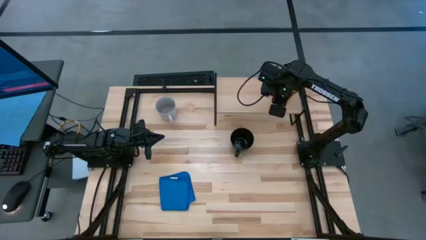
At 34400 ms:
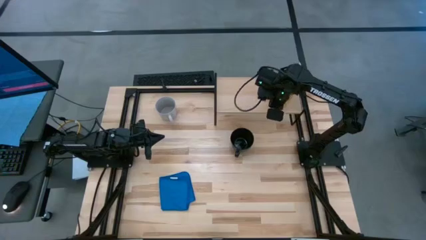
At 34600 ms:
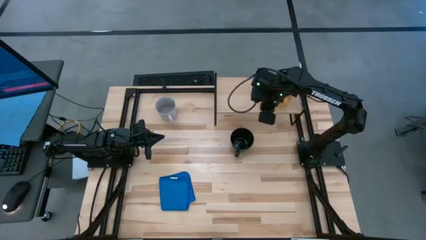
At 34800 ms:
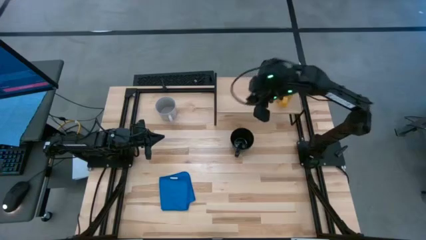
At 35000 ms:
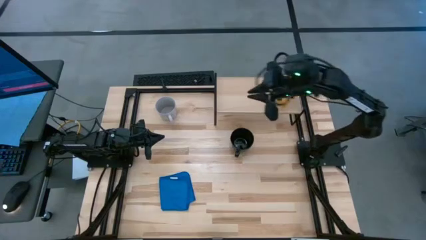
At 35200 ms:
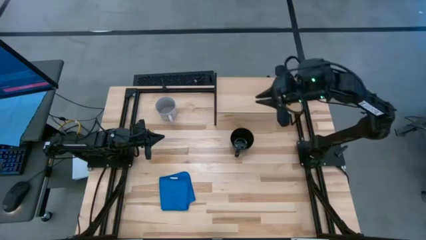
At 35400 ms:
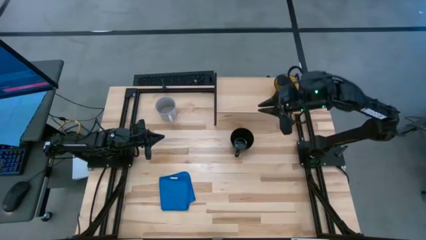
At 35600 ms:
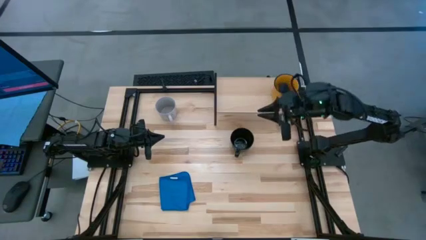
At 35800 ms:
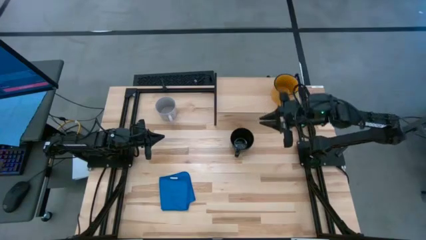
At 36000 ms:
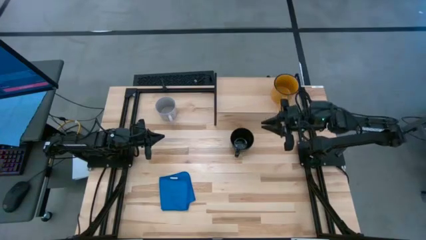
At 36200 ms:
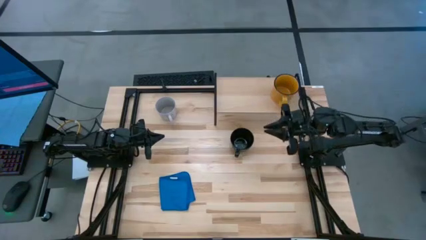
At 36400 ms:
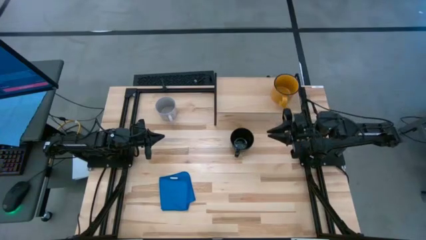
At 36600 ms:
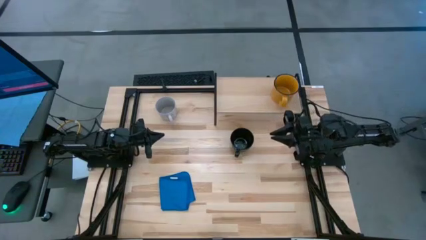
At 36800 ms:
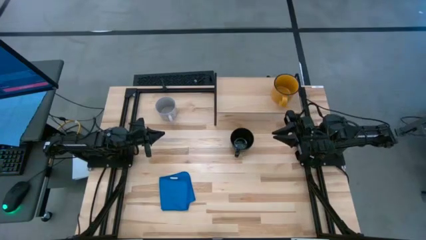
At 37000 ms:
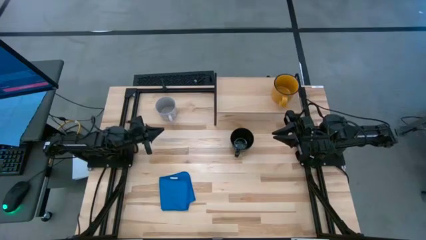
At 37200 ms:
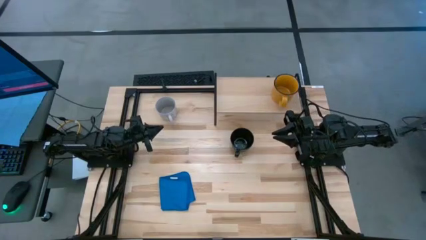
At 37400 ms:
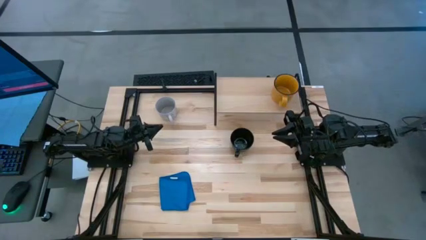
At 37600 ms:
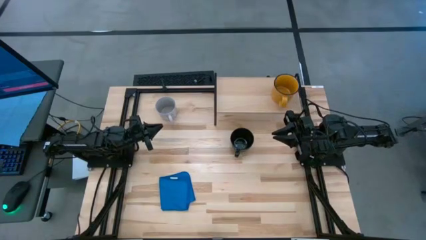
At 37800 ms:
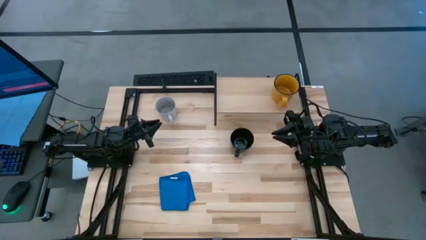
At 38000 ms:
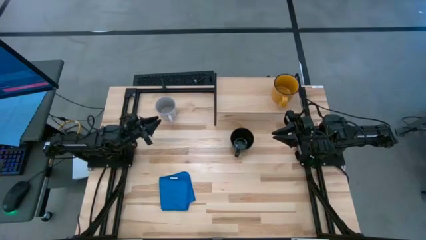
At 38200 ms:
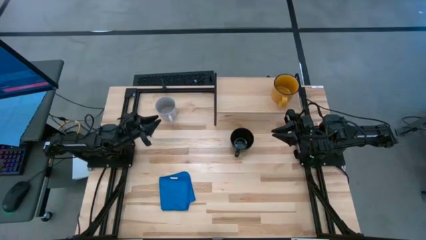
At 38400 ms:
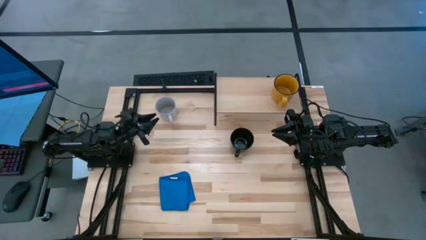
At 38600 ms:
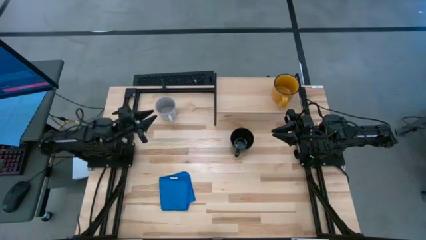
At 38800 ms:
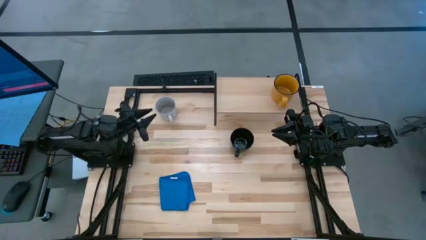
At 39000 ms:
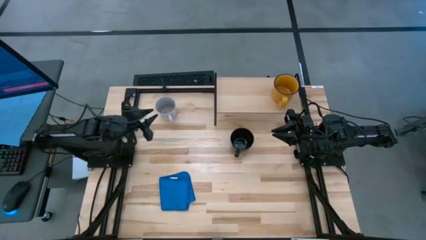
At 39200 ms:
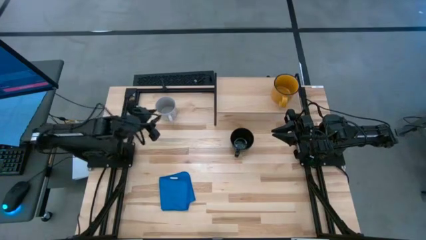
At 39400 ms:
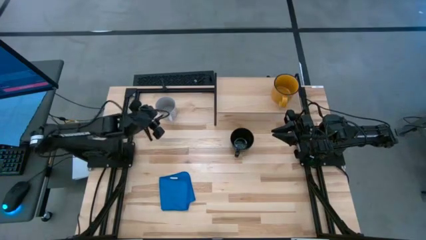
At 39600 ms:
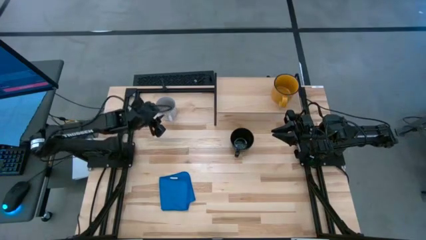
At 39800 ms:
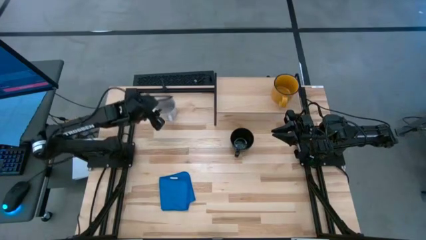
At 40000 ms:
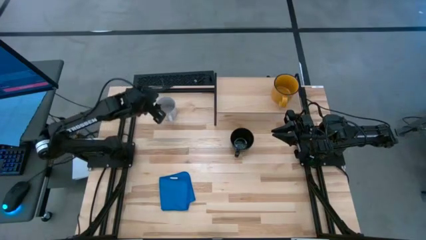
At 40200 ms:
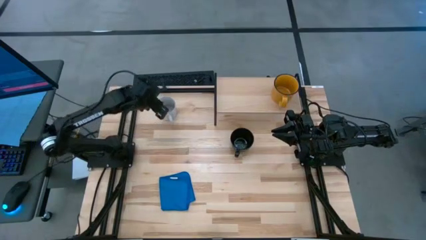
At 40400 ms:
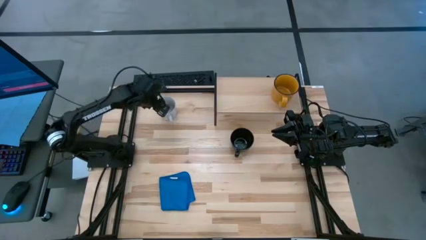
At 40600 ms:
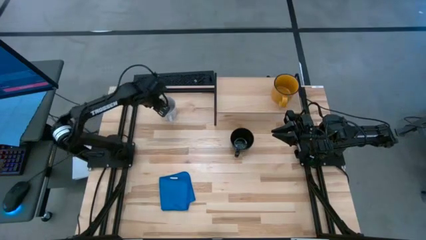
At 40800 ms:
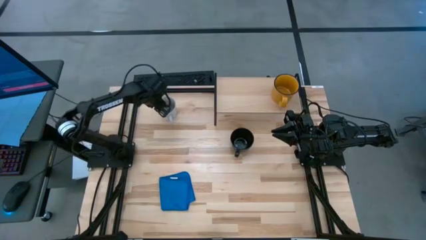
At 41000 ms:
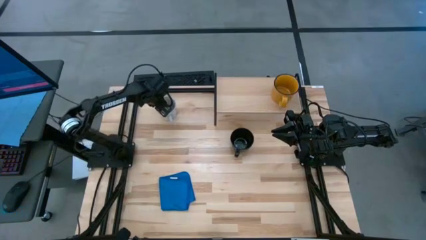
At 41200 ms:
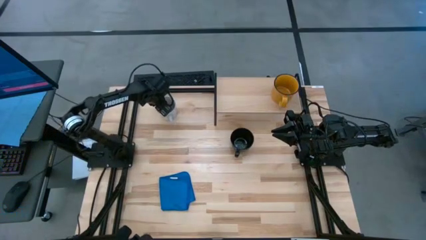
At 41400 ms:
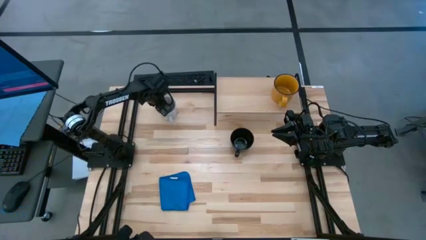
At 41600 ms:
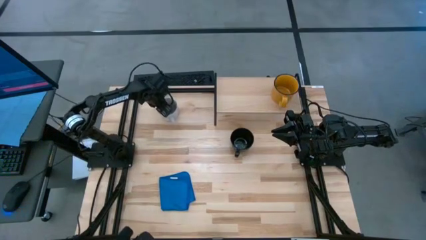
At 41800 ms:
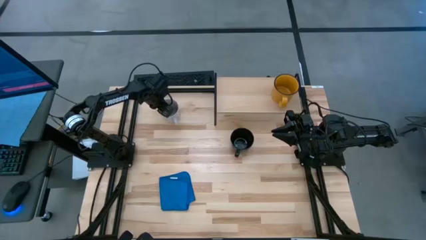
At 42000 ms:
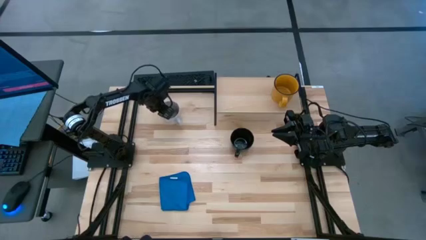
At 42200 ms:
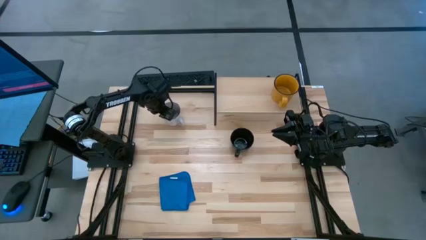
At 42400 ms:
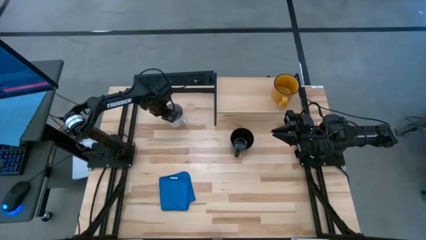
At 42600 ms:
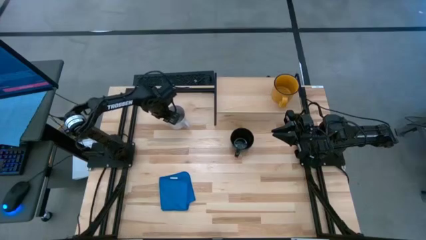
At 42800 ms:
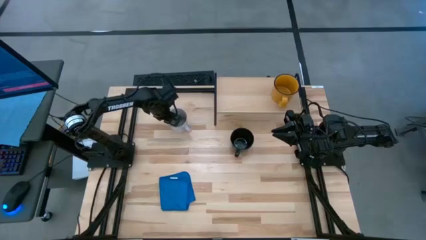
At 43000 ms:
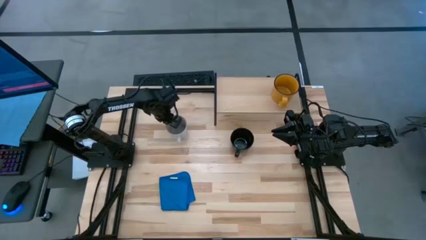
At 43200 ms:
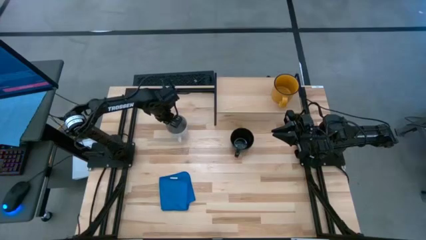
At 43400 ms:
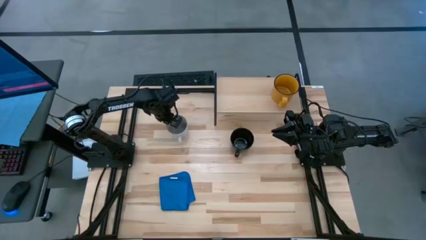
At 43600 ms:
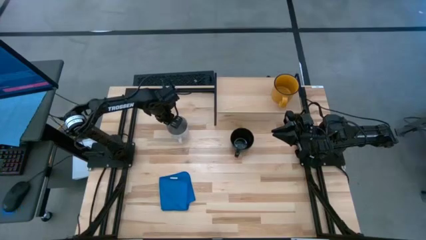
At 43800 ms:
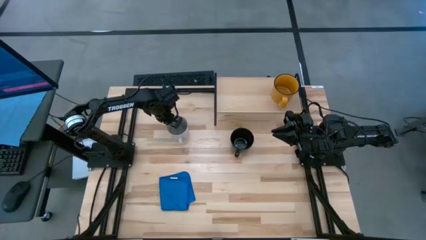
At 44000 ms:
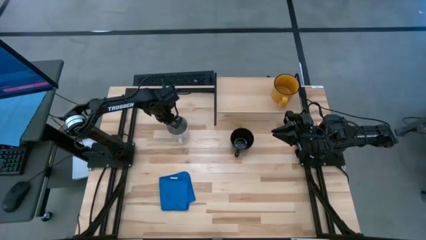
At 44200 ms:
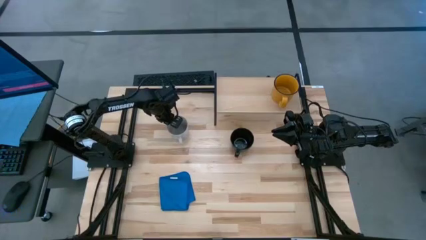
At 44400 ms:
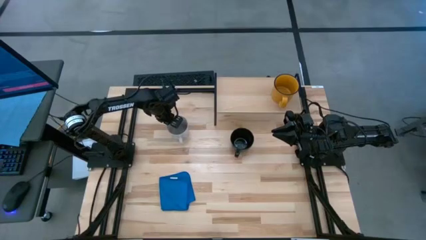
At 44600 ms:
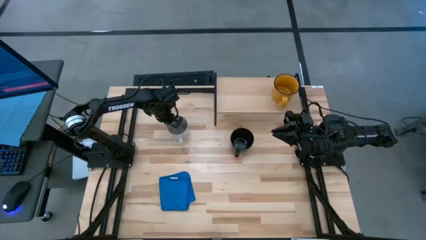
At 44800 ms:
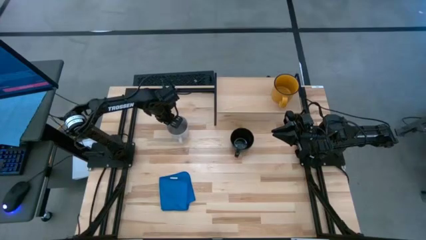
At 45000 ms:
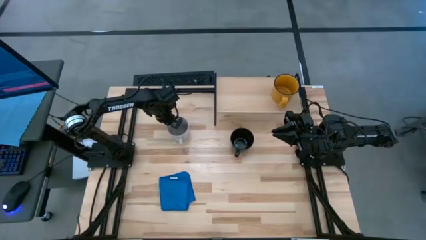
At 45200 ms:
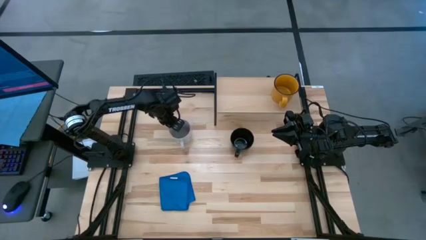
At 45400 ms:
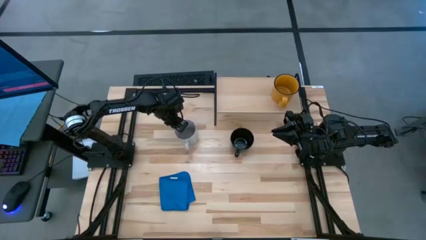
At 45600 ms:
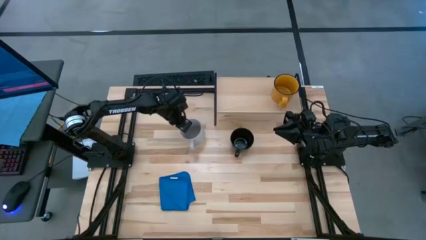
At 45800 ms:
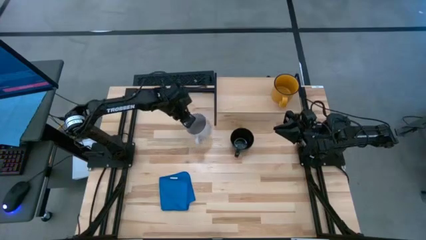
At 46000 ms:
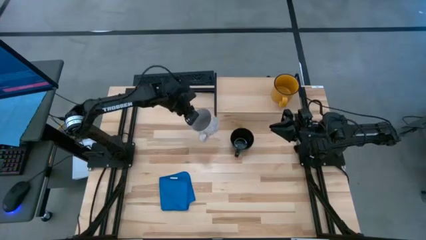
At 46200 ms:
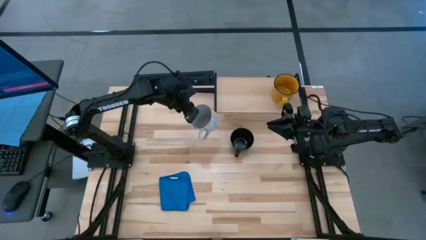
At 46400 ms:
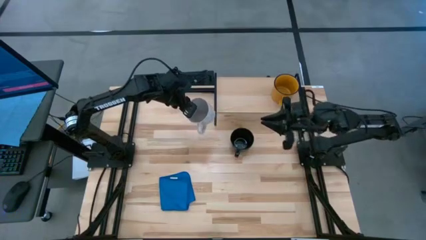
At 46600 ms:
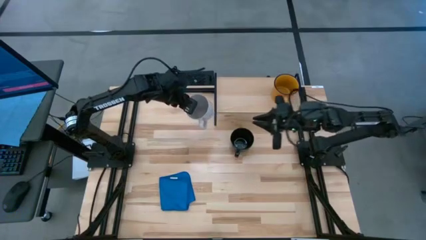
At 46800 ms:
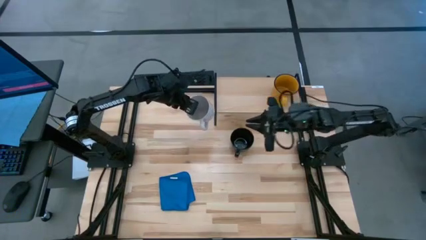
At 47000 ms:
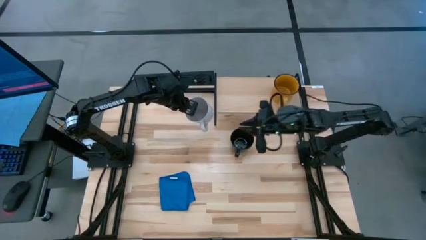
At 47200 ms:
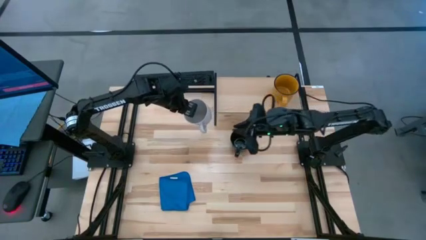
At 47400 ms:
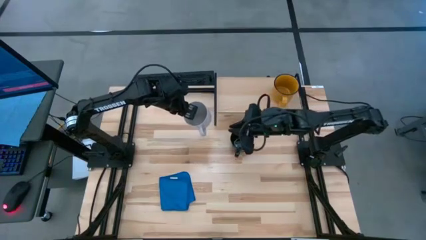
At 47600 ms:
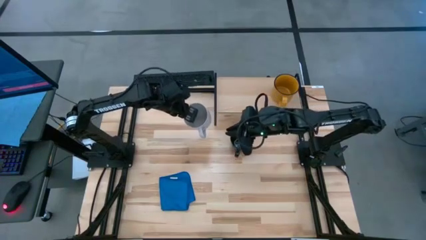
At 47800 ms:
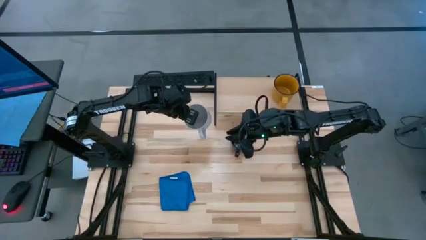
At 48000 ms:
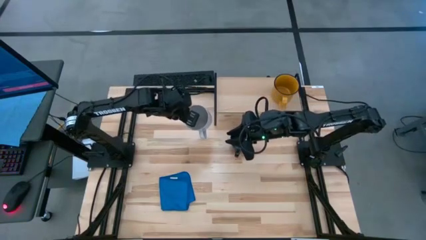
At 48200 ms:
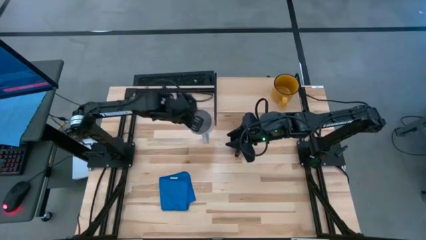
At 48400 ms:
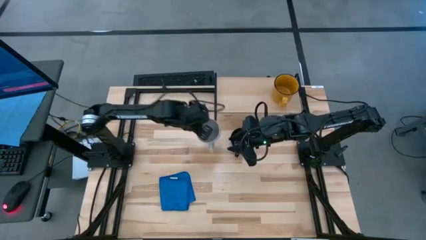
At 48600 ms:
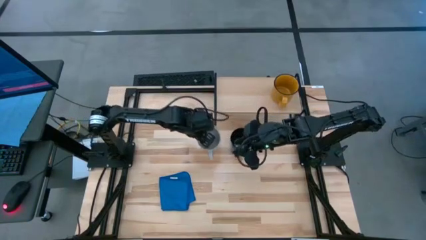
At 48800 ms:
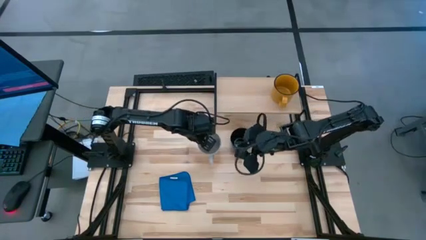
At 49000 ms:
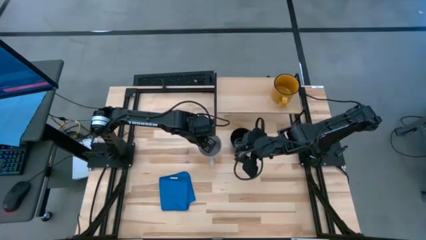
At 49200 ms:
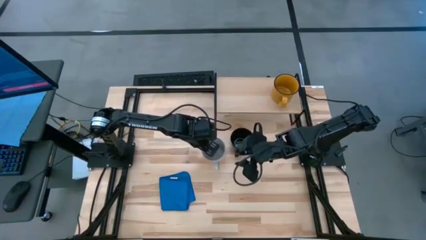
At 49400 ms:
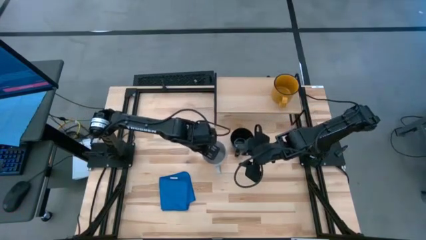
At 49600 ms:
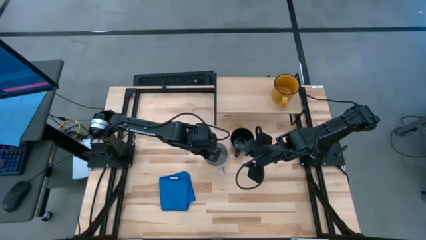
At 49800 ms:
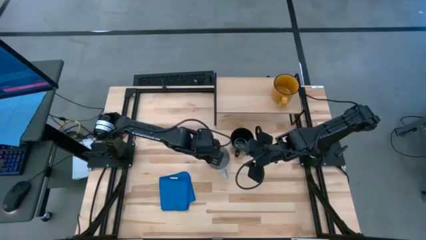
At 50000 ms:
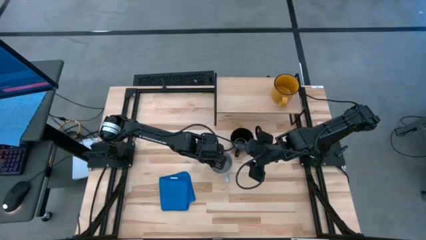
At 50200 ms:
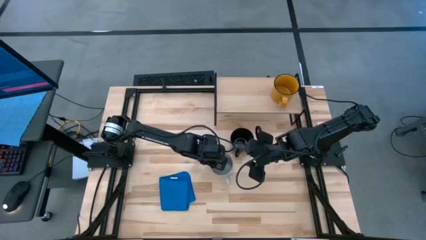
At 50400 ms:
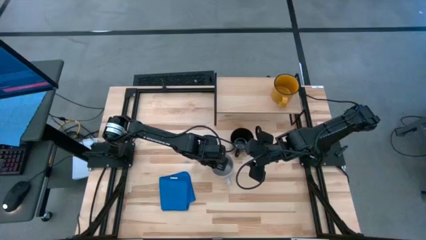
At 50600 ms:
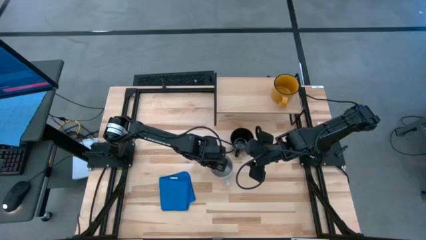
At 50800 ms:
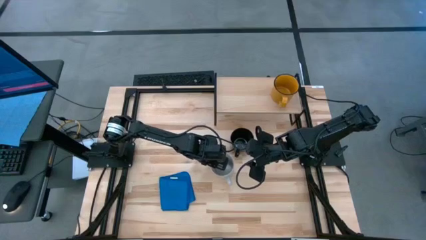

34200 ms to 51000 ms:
Task: Stack small to large cups/mugs on shelf
Put the gray mug on the shelf
